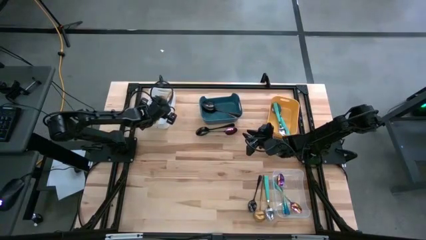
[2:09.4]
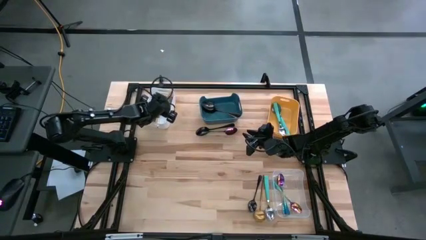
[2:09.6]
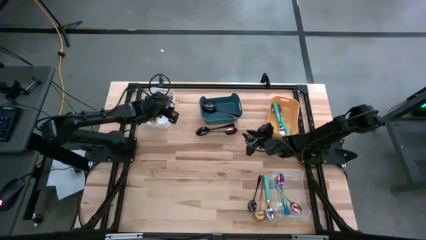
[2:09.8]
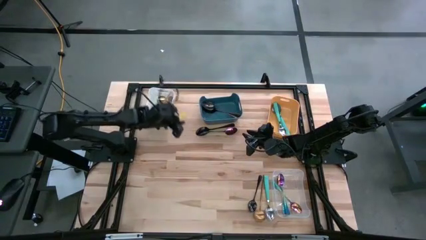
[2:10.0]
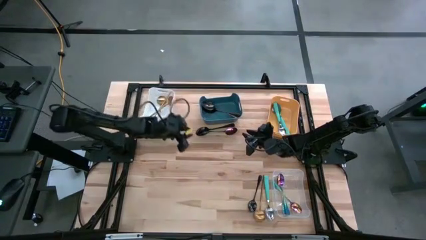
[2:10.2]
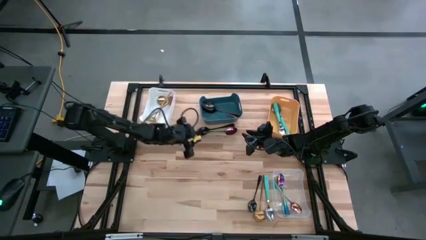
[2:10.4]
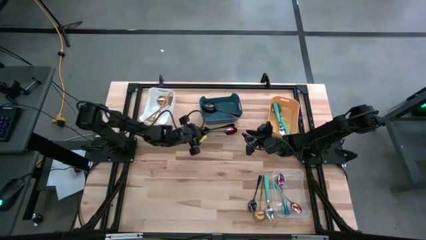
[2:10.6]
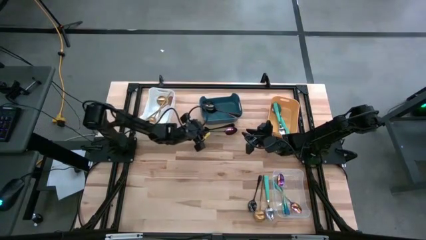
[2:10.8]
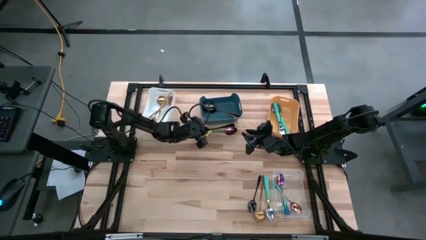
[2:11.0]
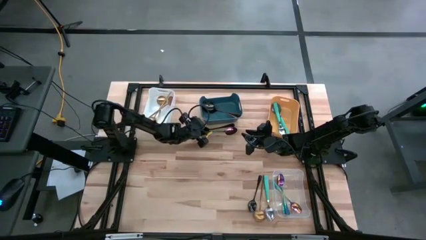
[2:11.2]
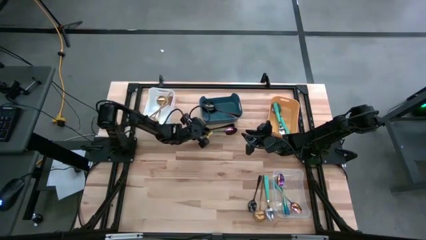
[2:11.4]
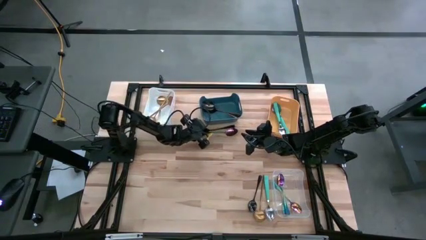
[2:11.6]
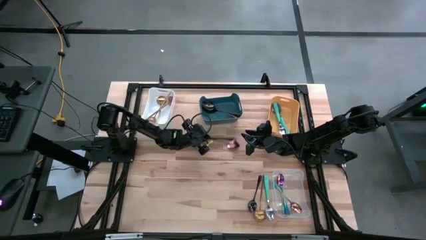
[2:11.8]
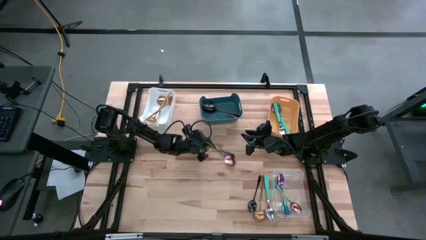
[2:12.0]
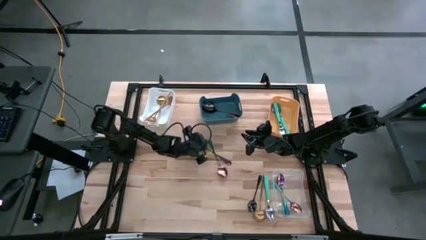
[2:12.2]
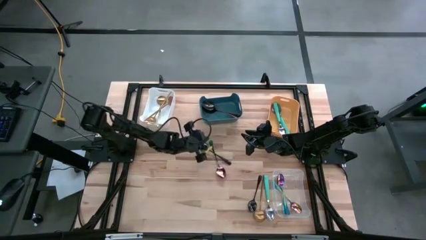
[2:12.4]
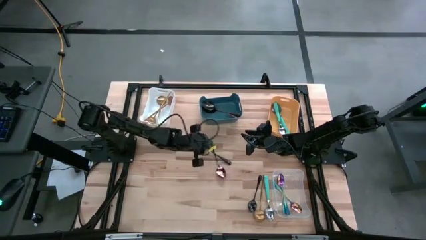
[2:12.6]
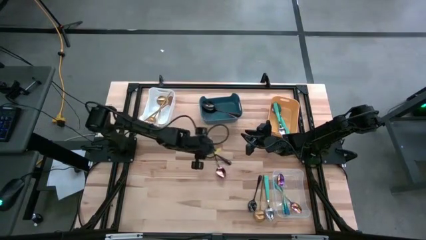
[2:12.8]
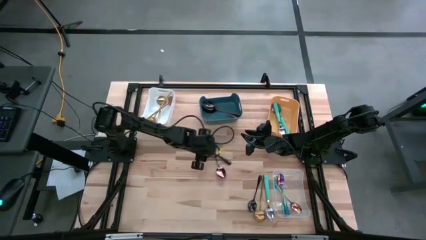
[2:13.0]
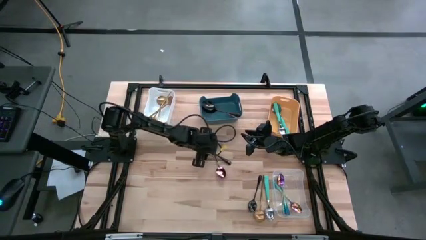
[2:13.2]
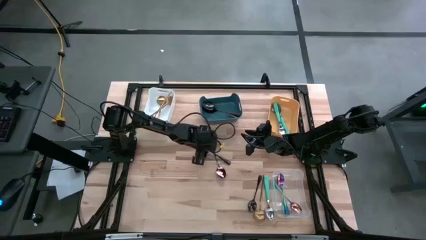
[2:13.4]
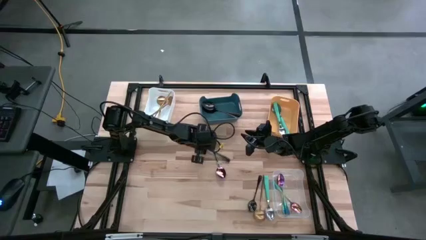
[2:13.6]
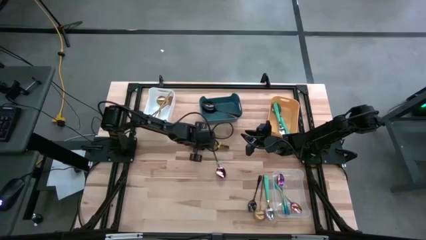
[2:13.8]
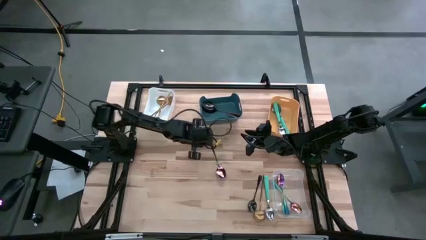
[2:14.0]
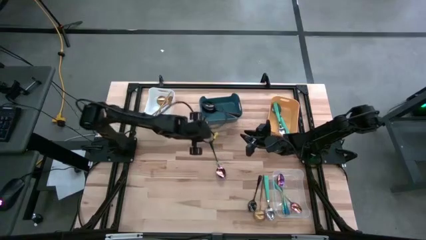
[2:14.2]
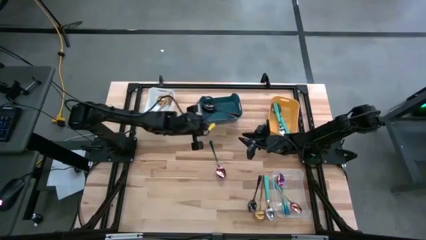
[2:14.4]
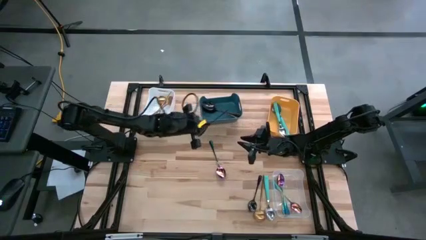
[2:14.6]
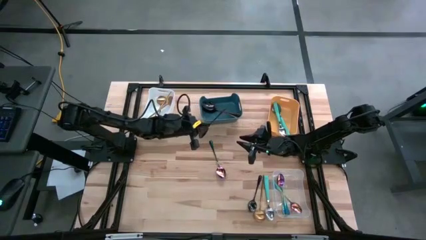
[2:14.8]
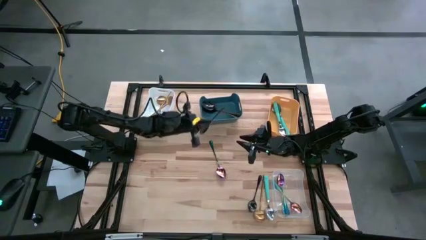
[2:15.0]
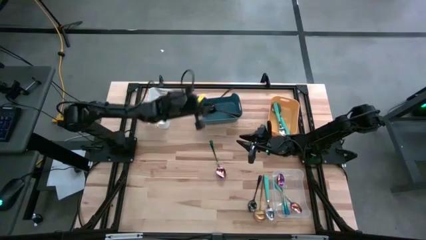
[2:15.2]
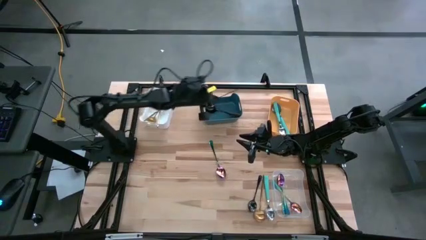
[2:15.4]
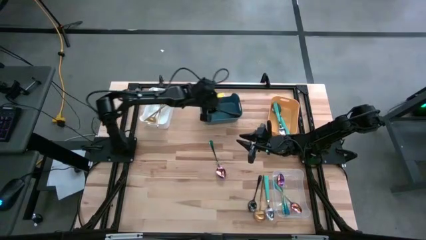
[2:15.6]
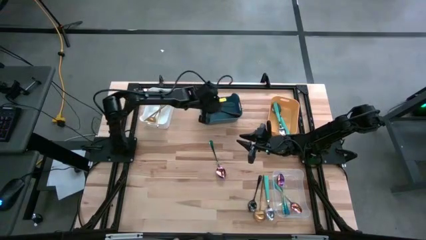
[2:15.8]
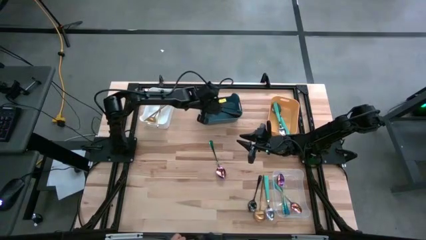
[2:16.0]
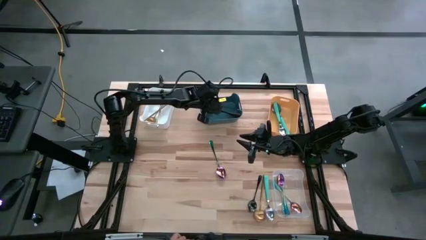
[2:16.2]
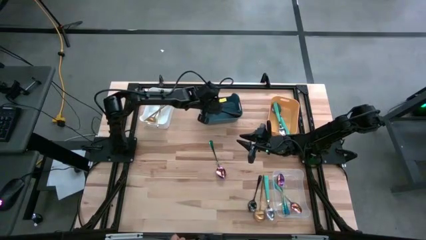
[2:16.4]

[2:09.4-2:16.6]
Task: Sort silverware by color (type)
Put the black spoon into the blue bin
